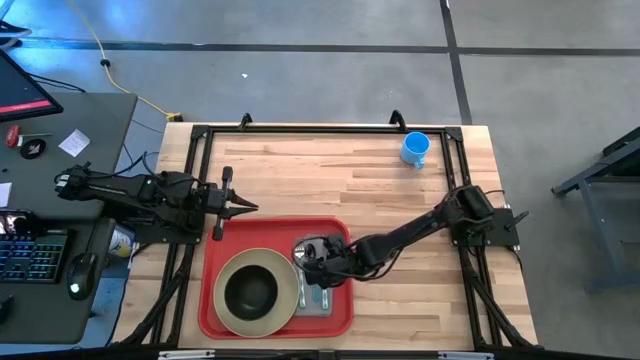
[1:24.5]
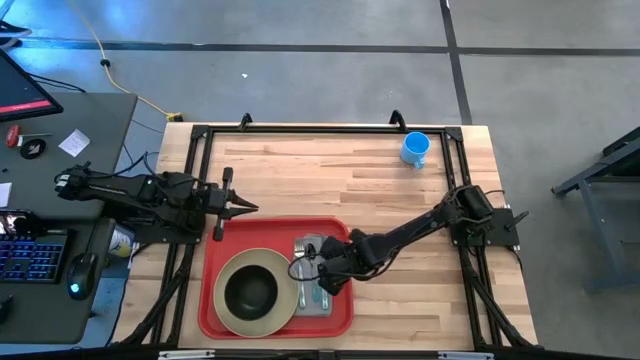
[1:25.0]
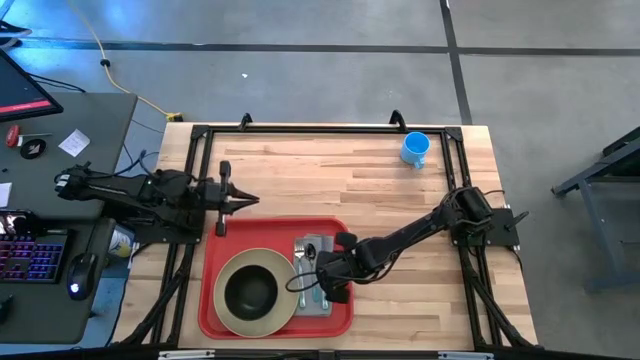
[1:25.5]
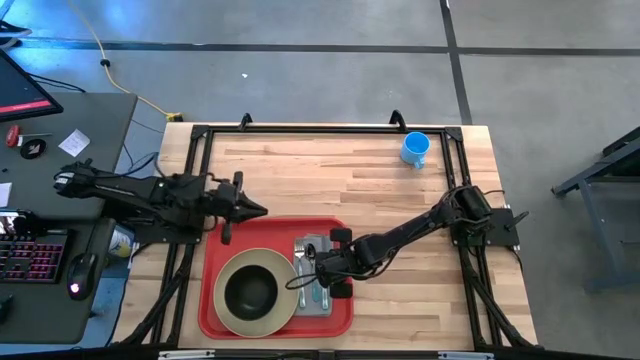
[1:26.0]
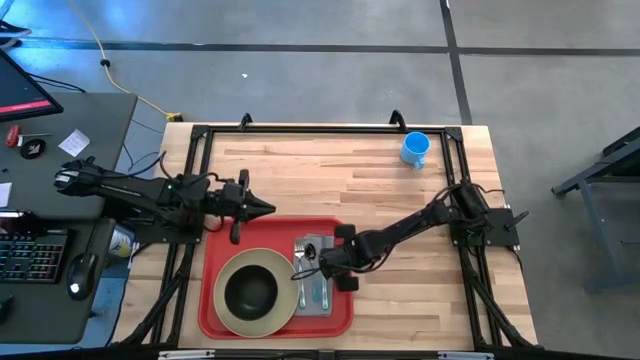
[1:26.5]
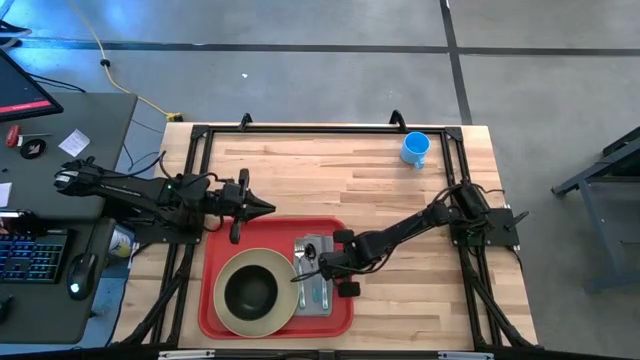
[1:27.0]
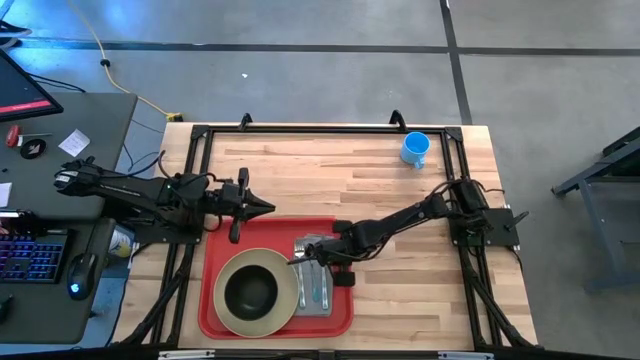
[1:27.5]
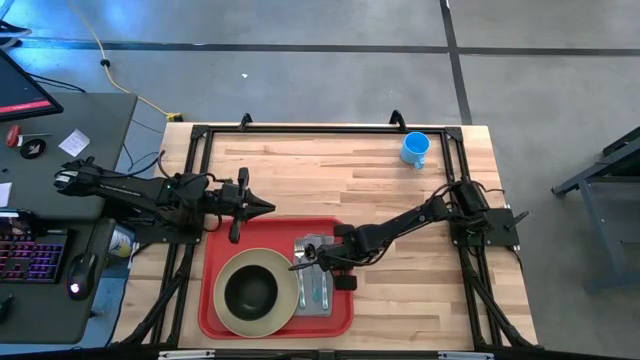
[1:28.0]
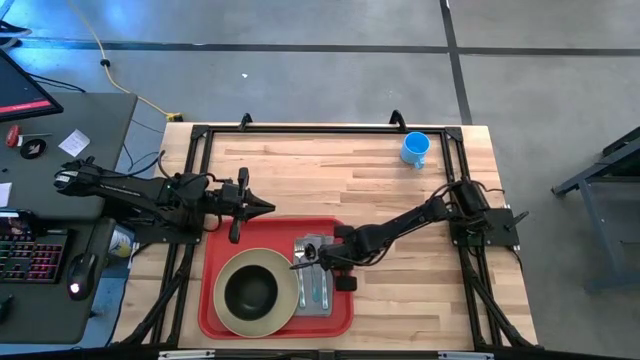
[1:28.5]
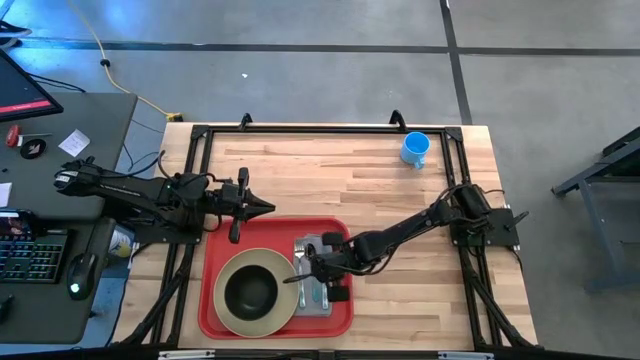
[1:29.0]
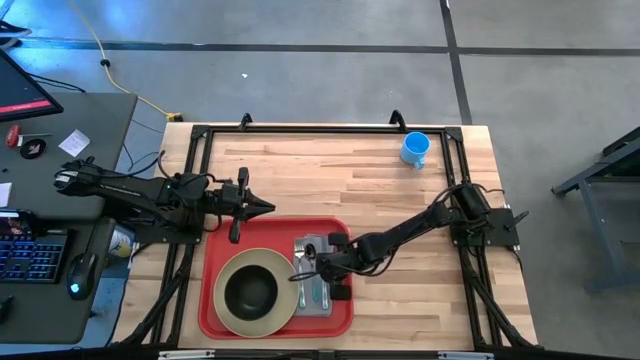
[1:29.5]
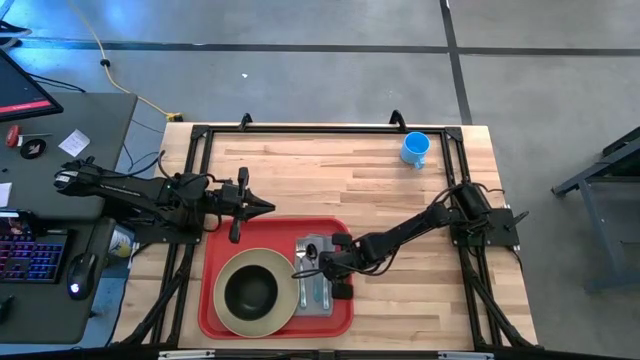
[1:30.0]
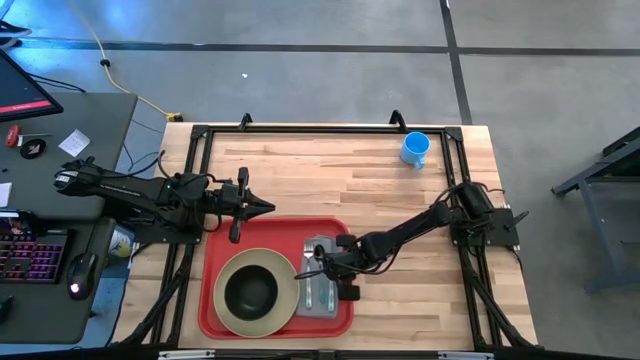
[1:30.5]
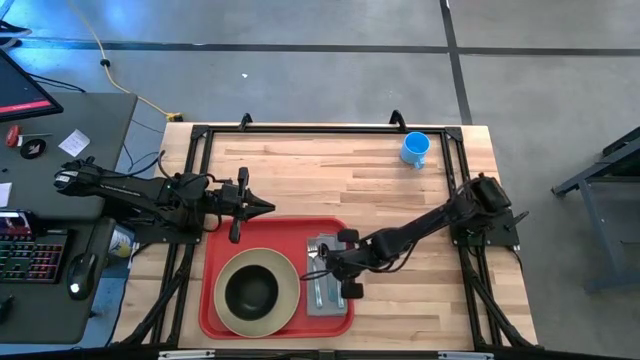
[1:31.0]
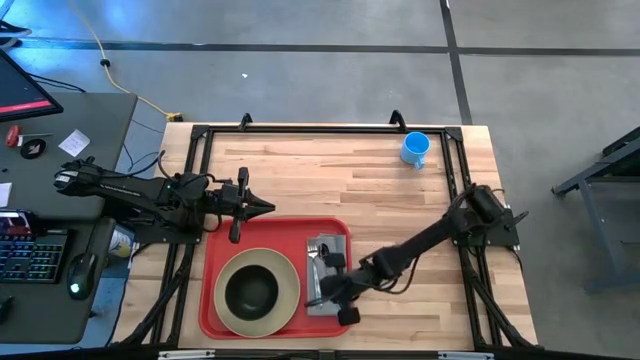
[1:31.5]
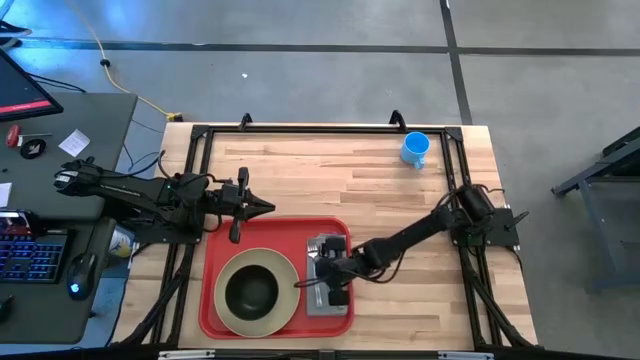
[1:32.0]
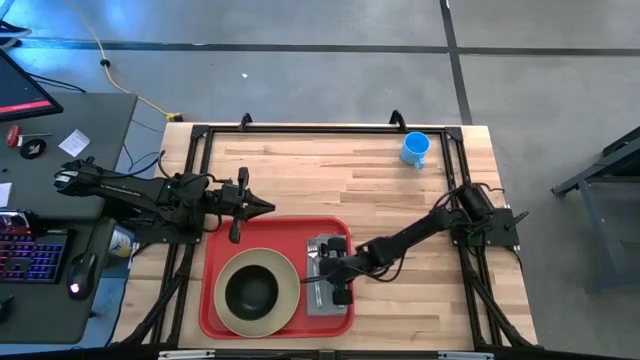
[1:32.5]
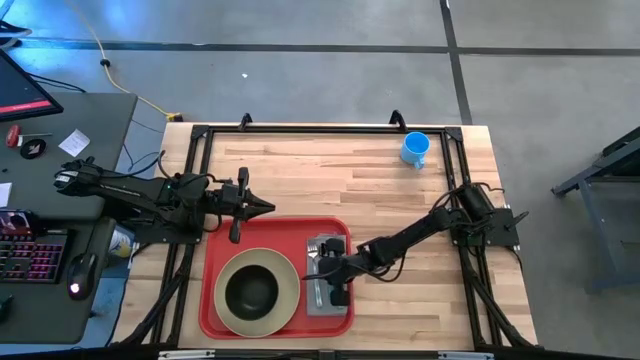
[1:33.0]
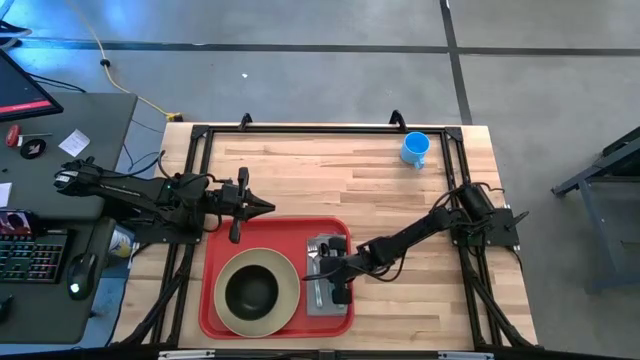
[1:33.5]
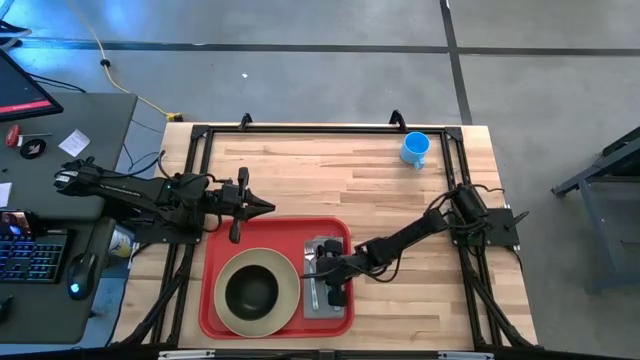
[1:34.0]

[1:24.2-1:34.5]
Task: Set up tray
Adjust the gray table napkin on the red serving tray

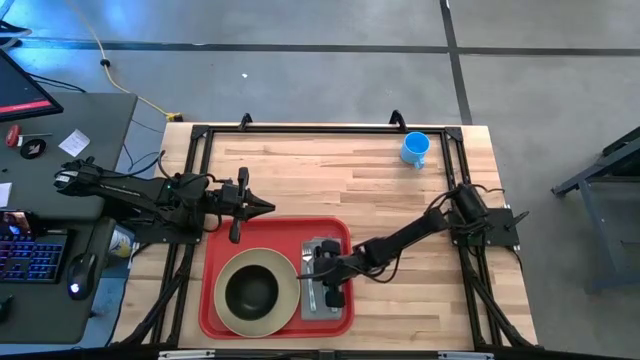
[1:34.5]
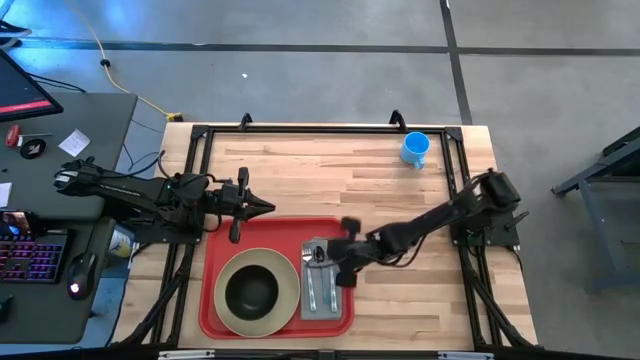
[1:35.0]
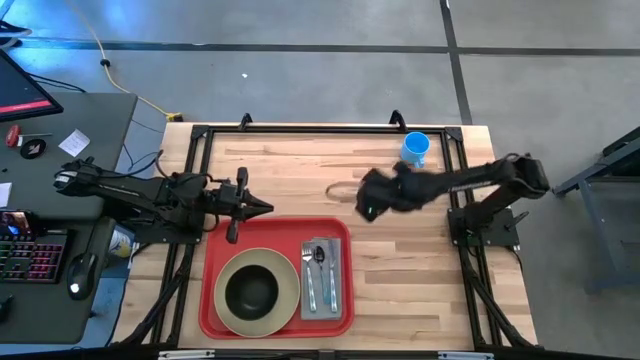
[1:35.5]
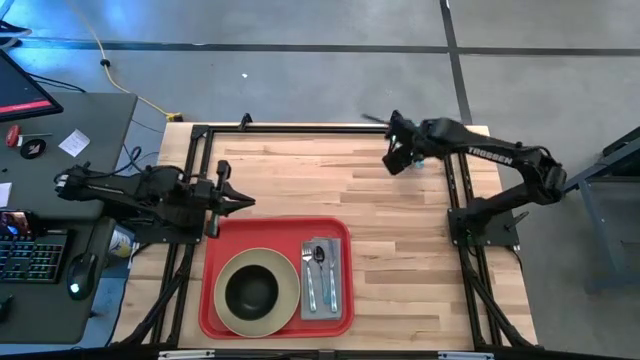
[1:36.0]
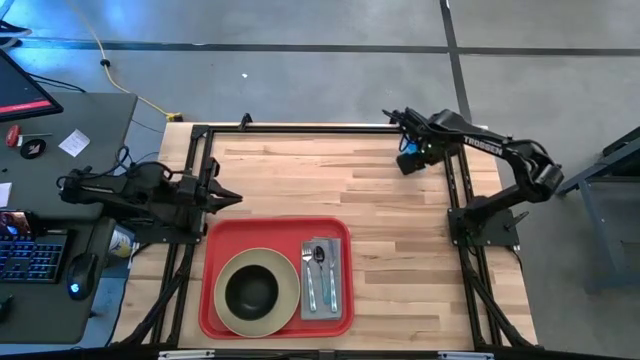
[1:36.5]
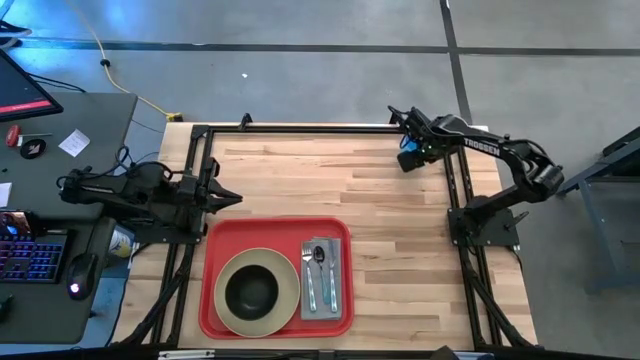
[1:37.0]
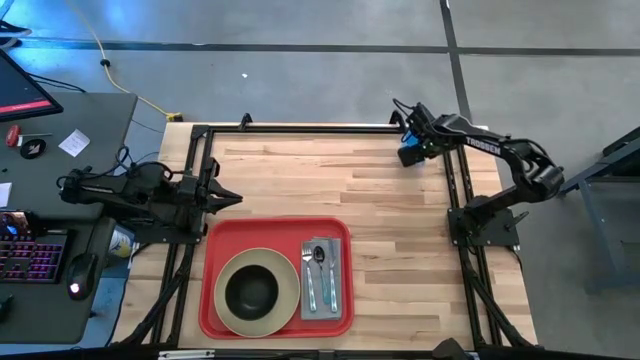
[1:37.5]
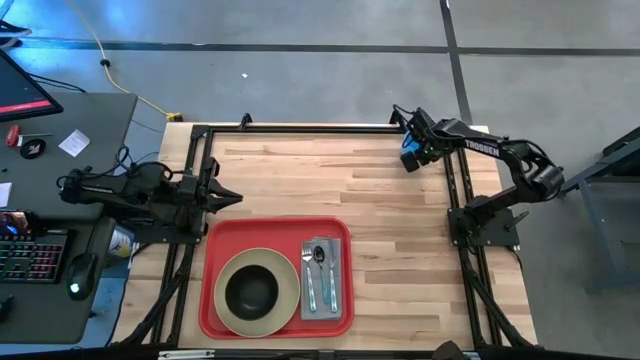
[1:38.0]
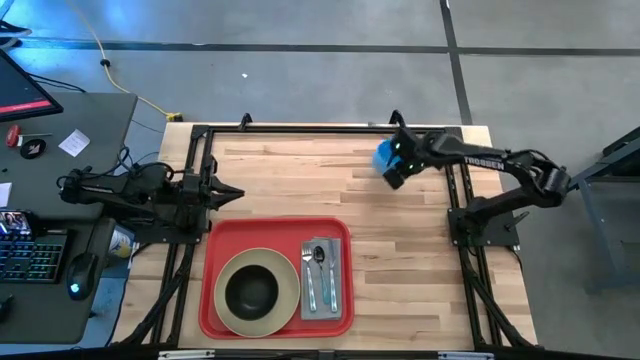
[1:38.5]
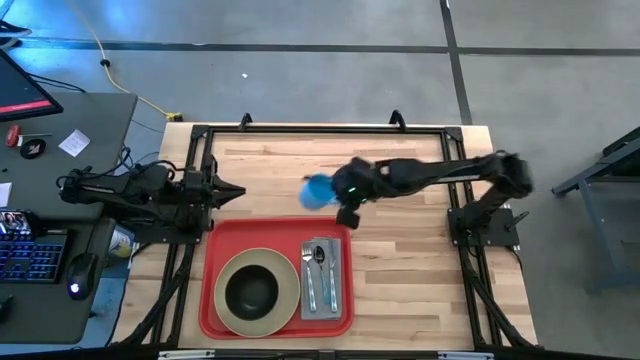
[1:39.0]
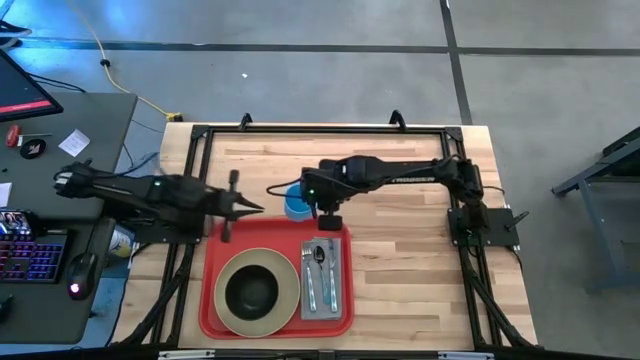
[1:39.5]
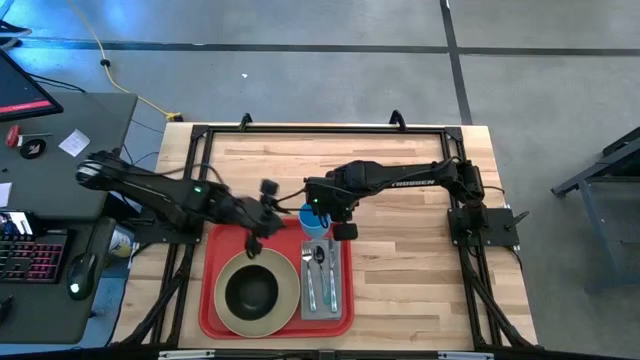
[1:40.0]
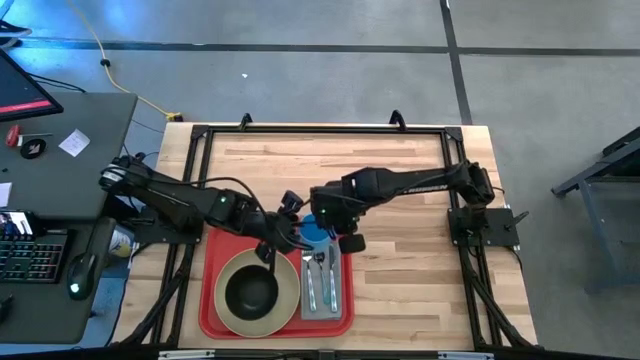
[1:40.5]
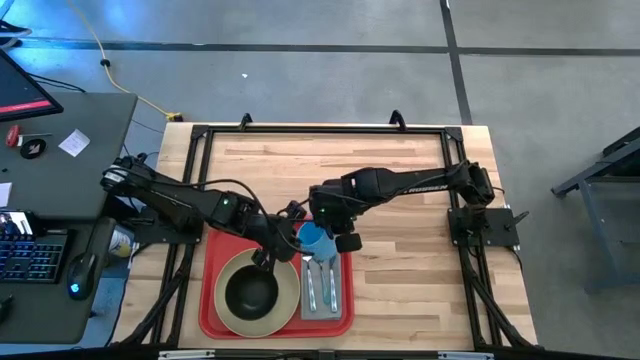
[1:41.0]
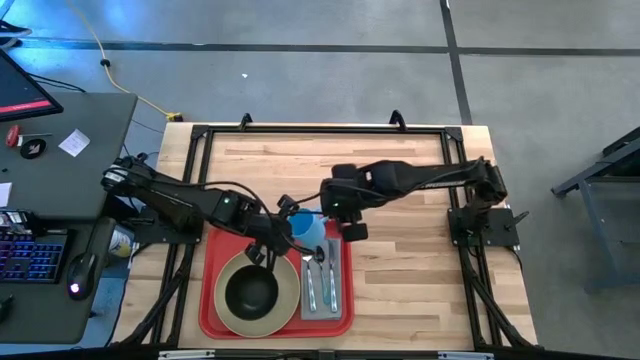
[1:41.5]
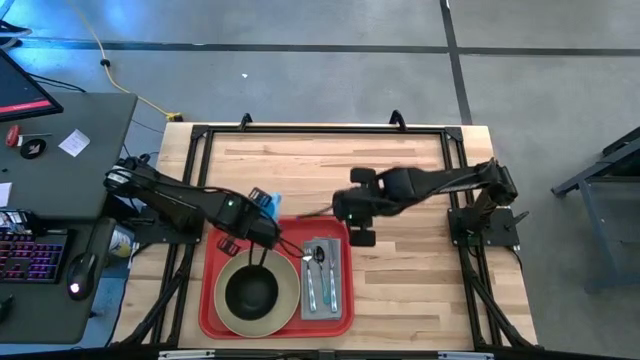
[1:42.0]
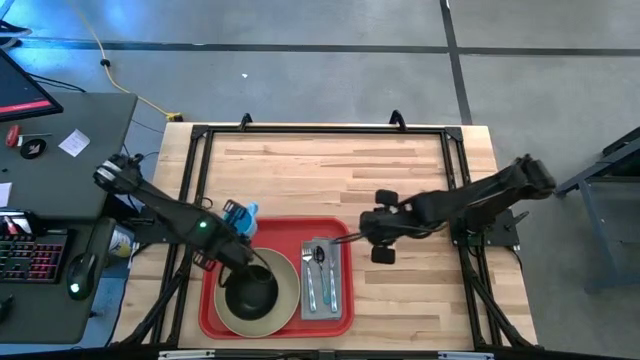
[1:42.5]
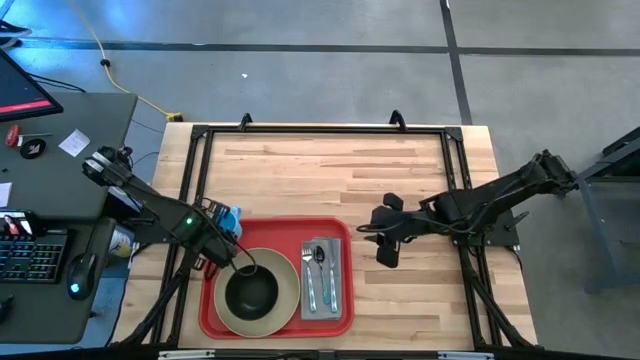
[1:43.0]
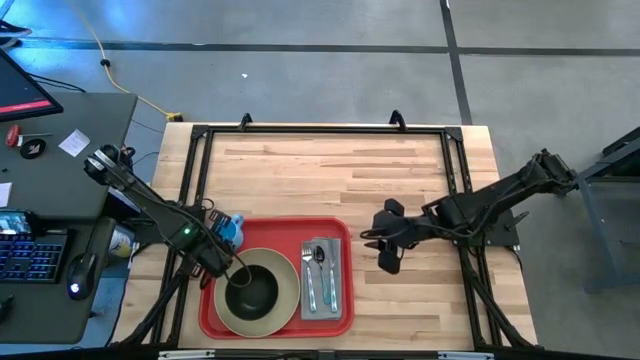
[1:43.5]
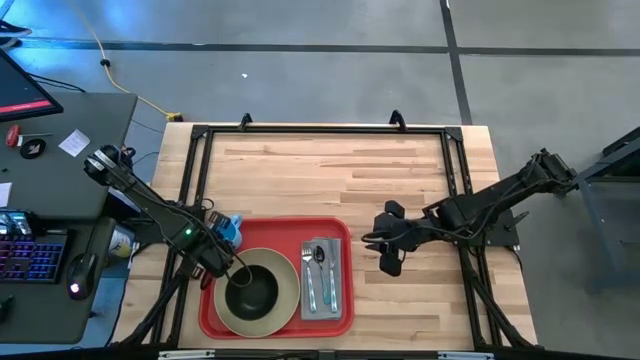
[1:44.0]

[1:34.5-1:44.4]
Put the blue mug on the red serving tray to the top left of the light brown plate
